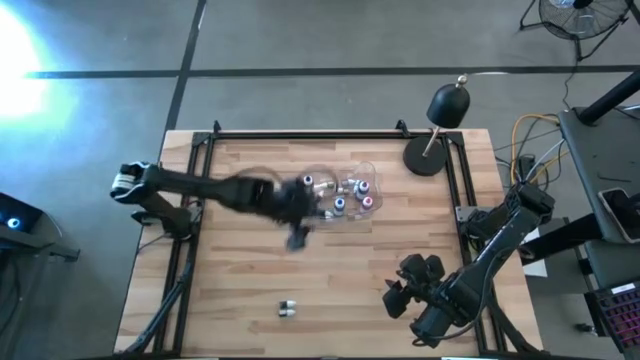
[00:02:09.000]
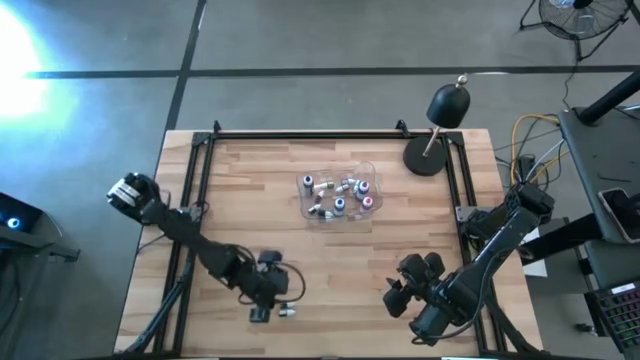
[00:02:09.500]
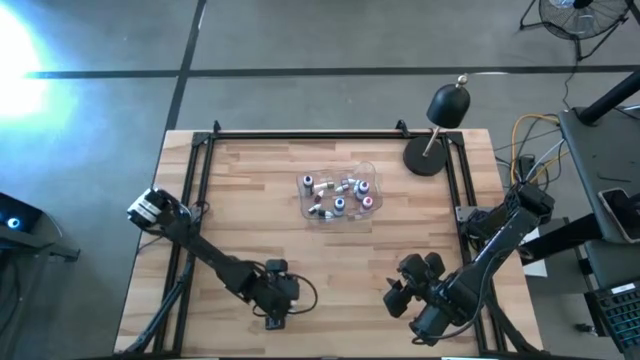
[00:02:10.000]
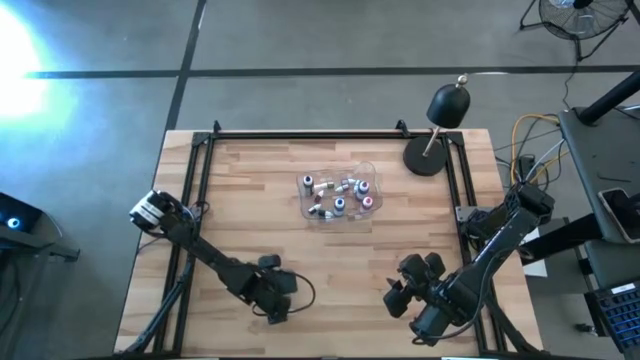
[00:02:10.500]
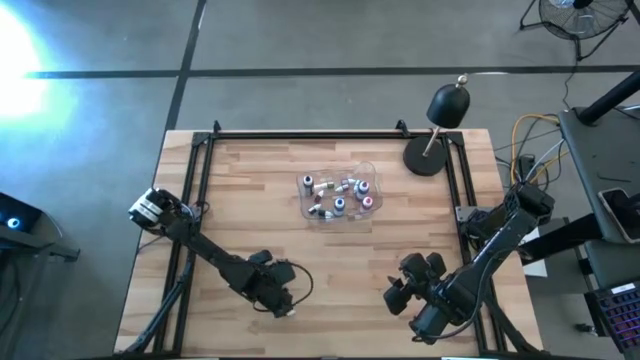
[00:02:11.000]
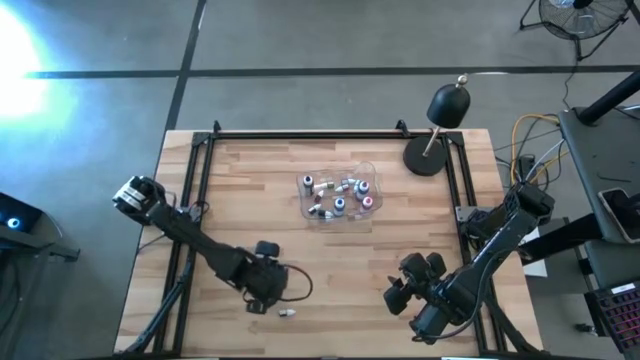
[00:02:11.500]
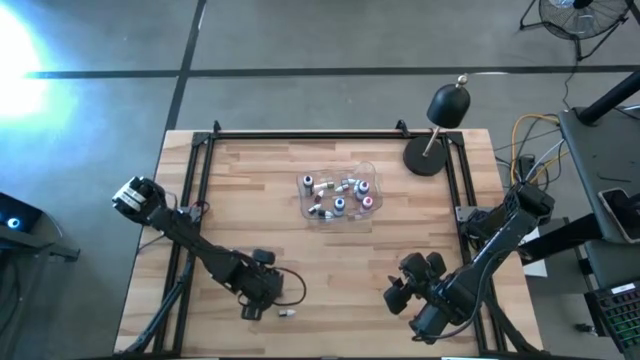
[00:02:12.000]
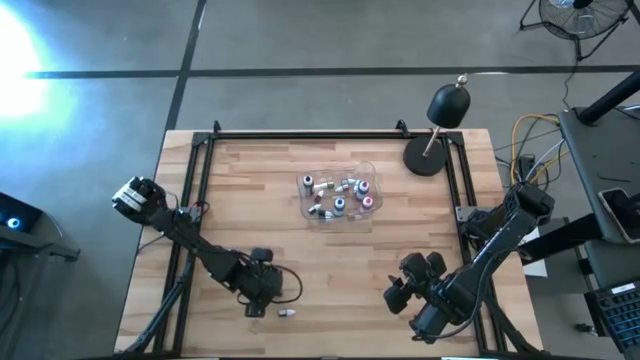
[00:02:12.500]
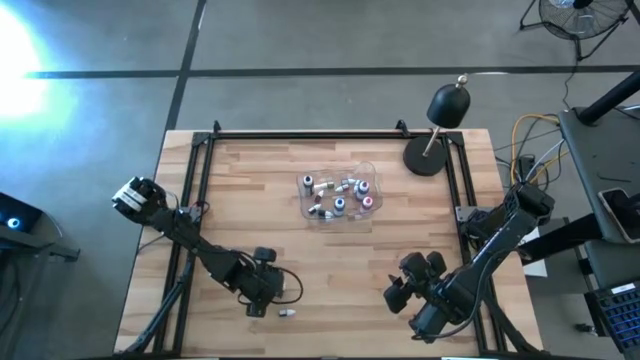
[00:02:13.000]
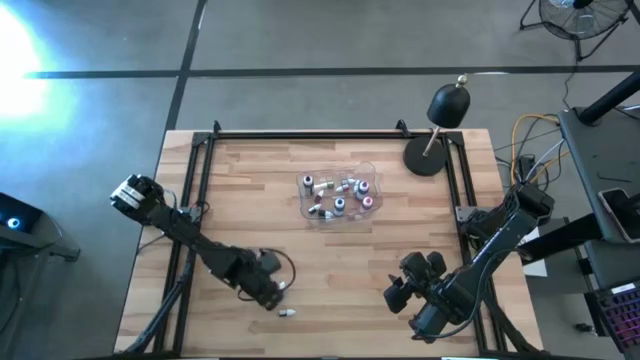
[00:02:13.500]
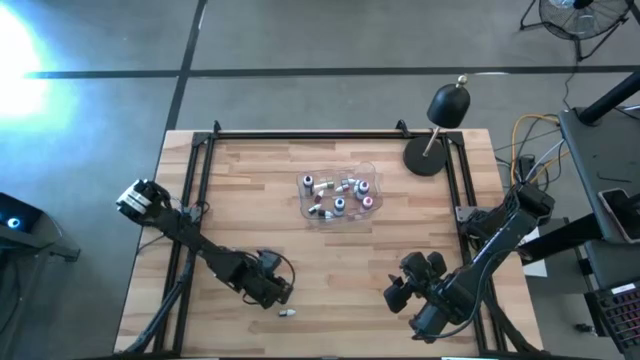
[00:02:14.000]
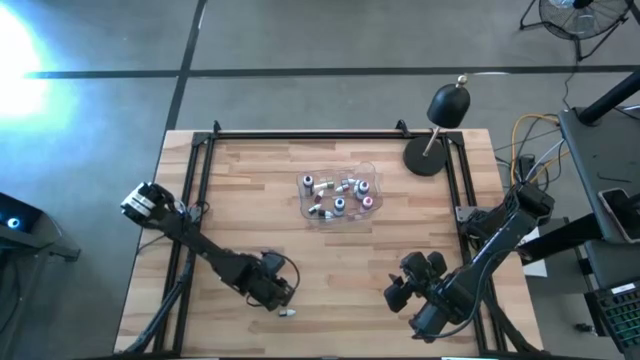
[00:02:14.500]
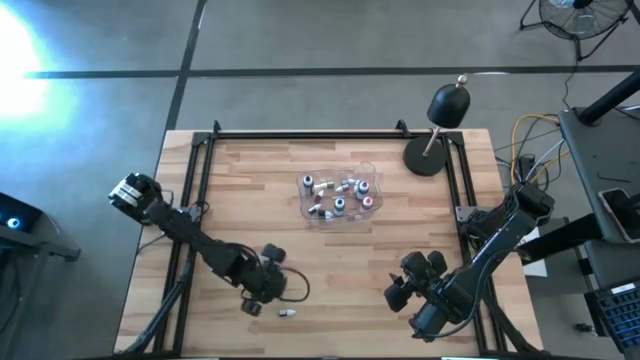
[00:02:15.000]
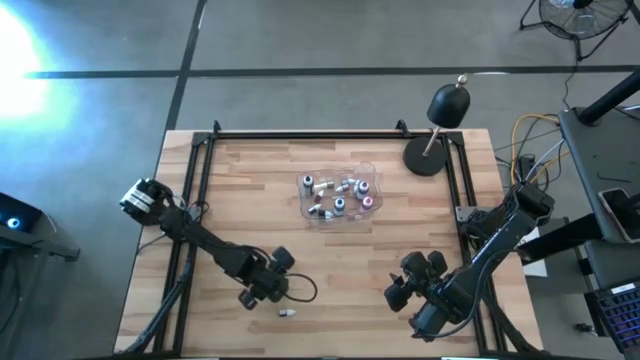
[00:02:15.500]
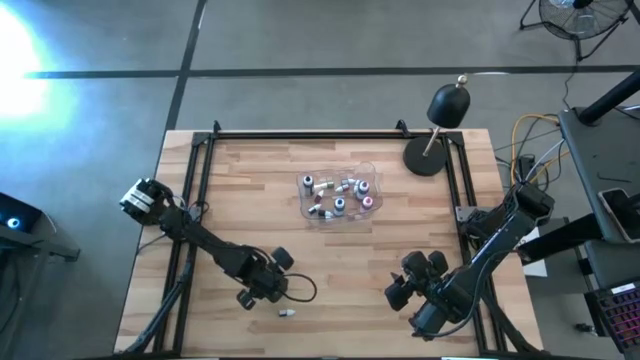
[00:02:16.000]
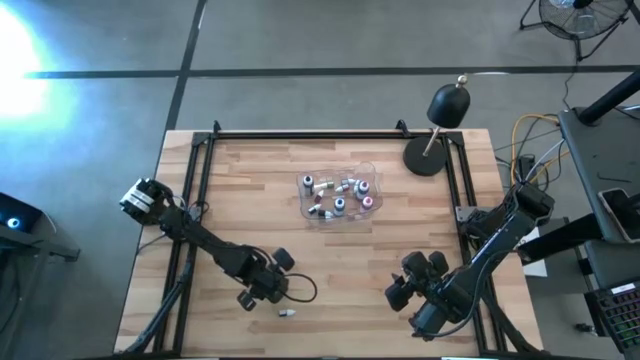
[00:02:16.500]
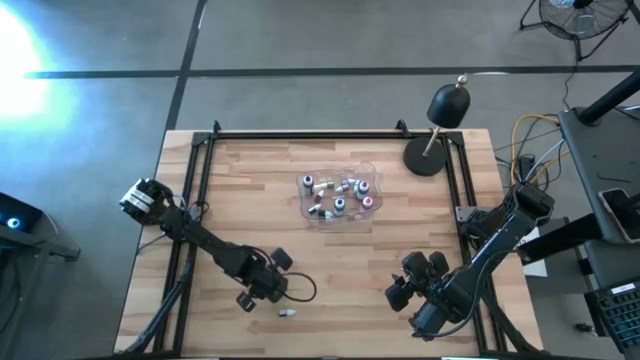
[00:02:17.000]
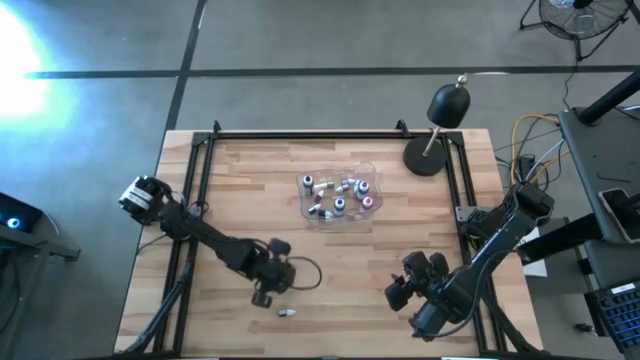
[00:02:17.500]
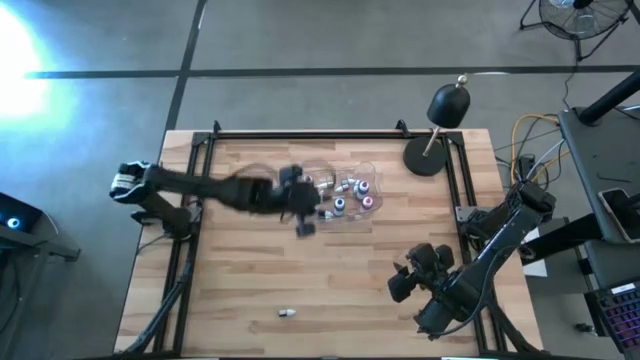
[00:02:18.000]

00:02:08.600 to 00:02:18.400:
Task: Pick & Place food coloring
Put the small violet food coloring bottle into the transparent bin

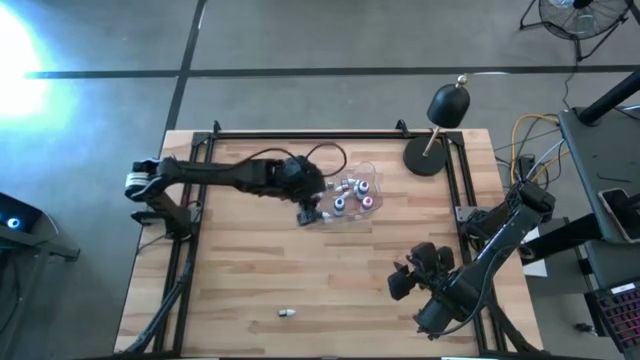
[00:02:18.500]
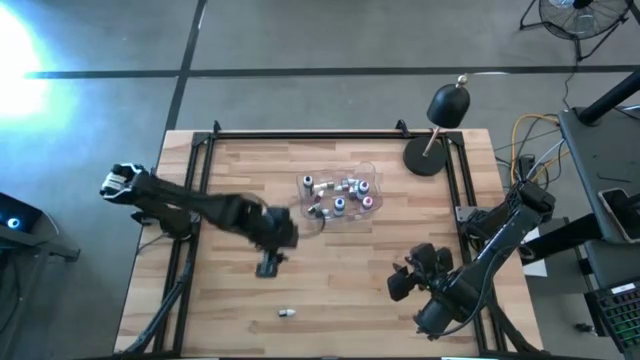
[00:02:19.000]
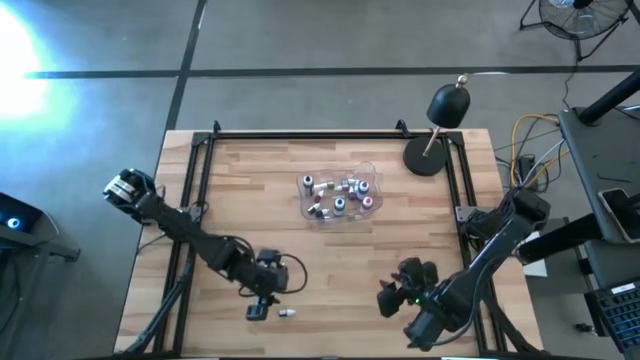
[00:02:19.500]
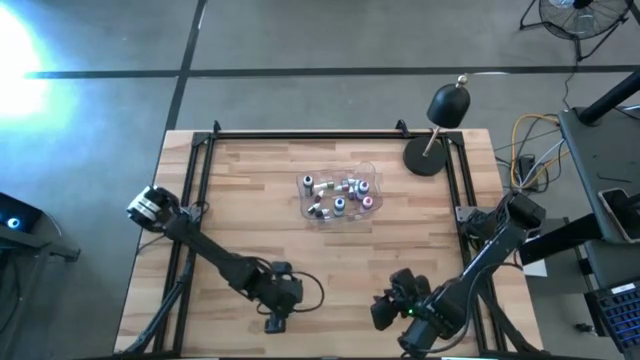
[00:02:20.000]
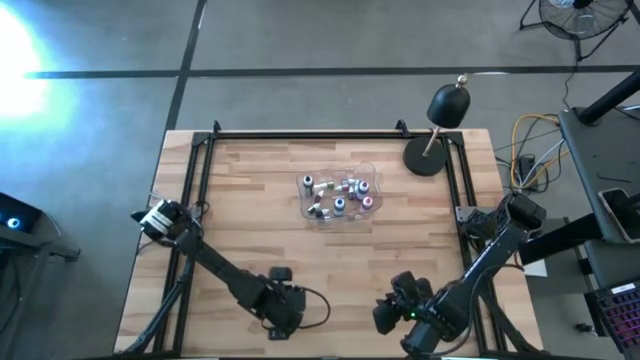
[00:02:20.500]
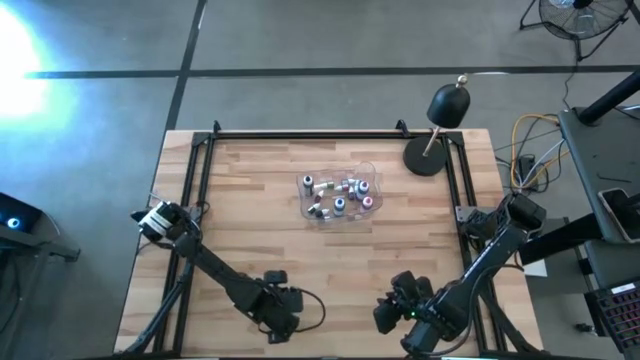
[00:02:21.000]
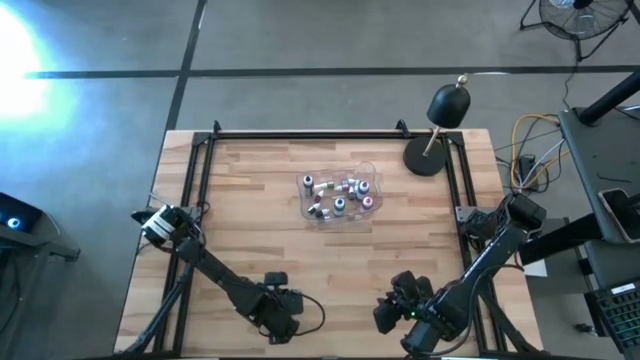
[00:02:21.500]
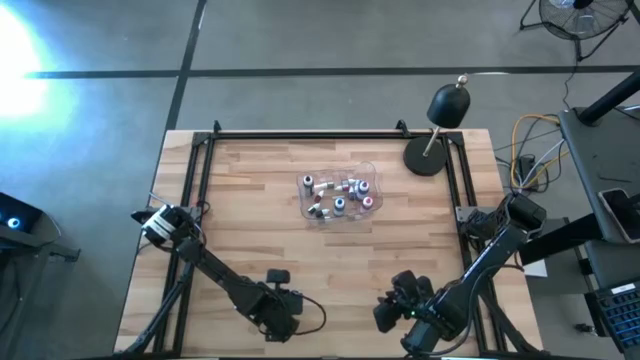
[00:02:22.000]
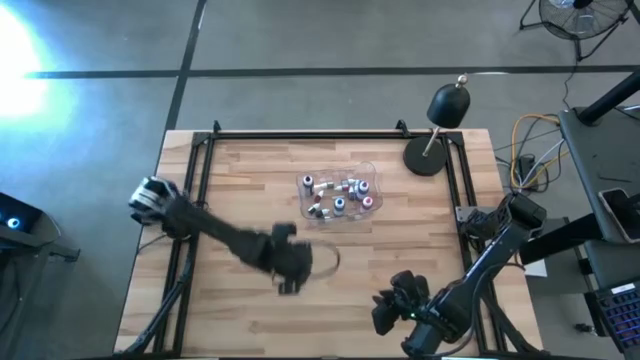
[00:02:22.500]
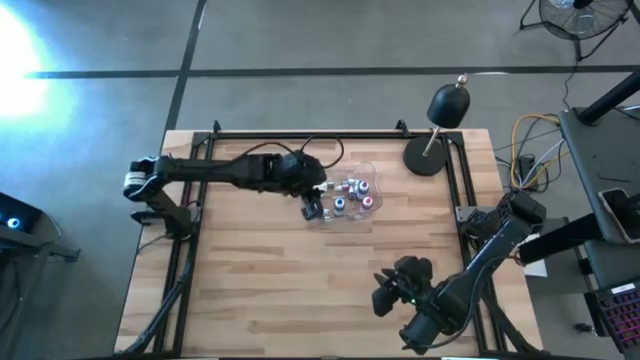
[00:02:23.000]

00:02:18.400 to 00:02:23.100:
Put the small blue food coloring bottle into the transparent bin

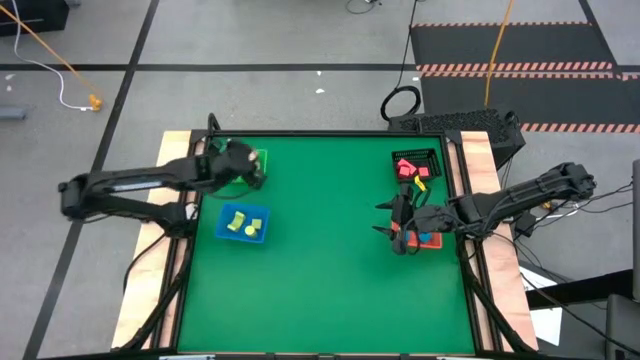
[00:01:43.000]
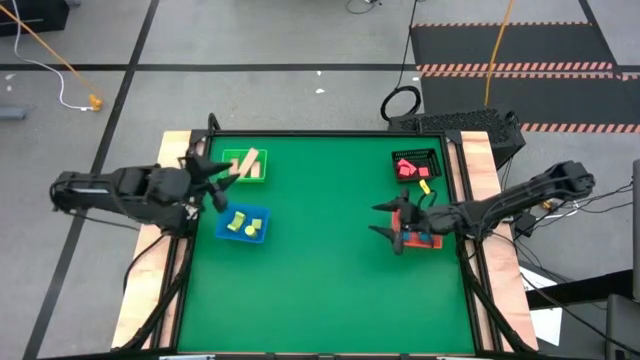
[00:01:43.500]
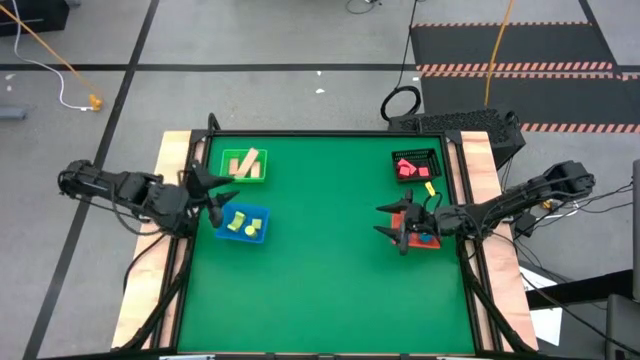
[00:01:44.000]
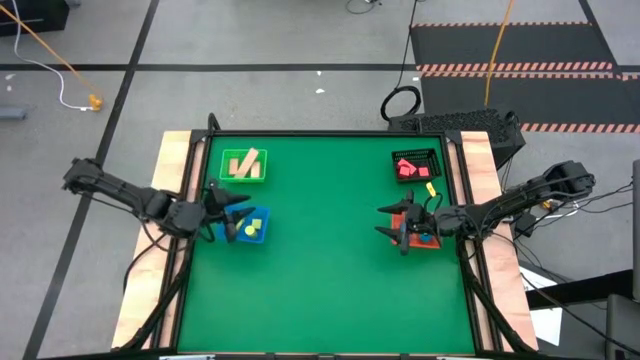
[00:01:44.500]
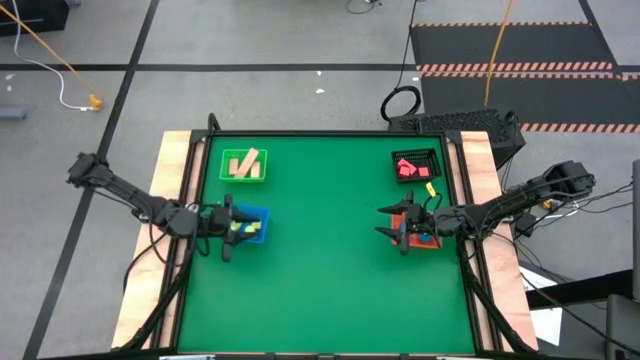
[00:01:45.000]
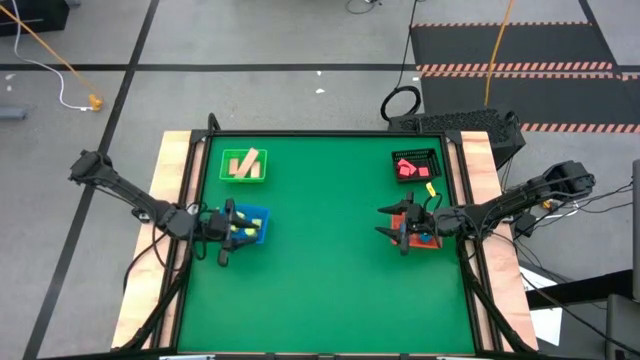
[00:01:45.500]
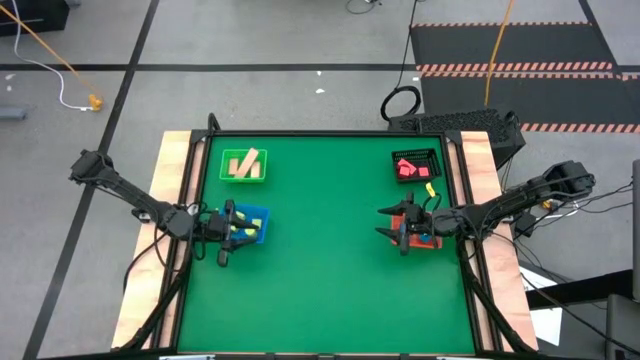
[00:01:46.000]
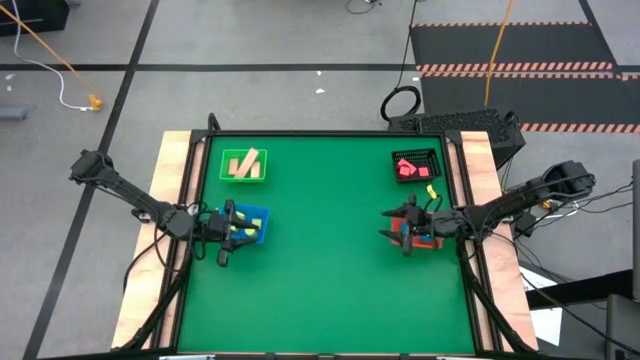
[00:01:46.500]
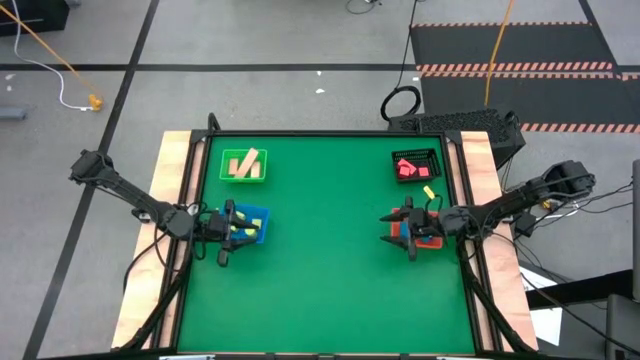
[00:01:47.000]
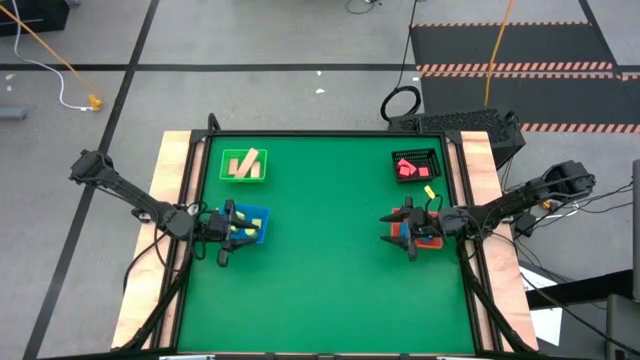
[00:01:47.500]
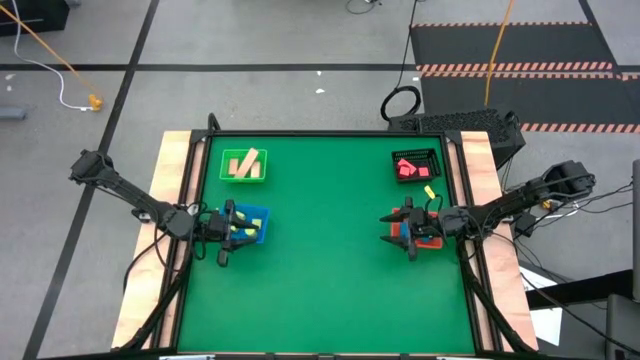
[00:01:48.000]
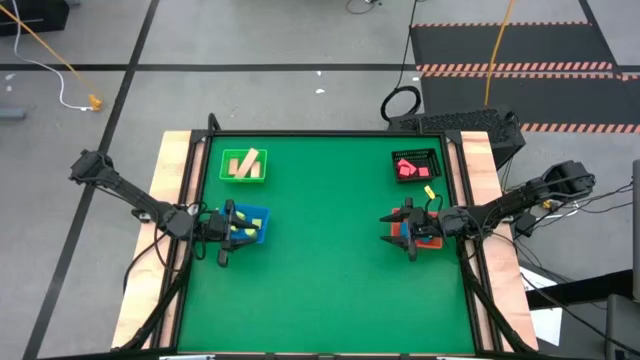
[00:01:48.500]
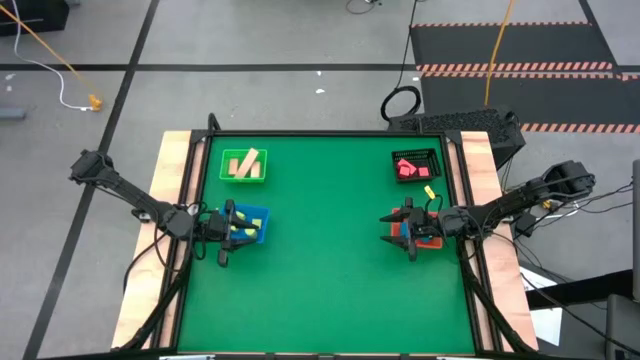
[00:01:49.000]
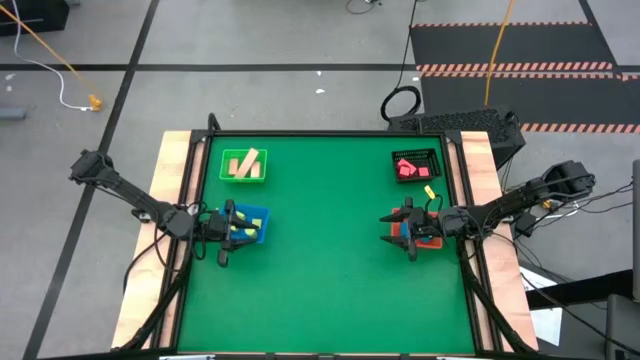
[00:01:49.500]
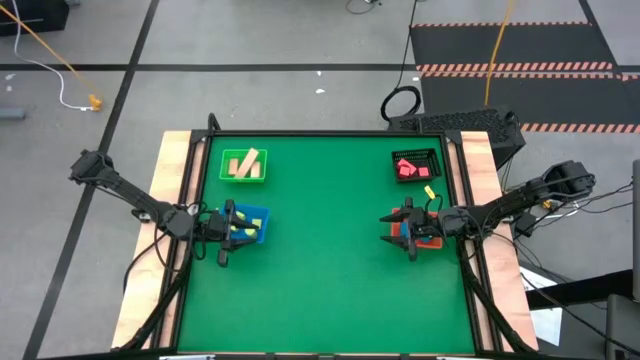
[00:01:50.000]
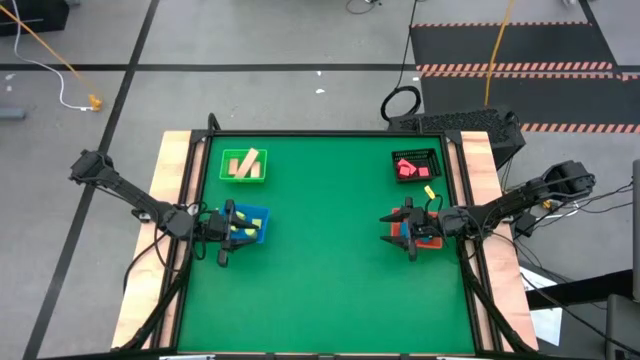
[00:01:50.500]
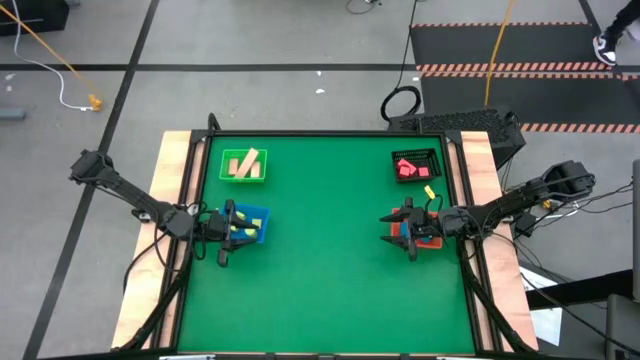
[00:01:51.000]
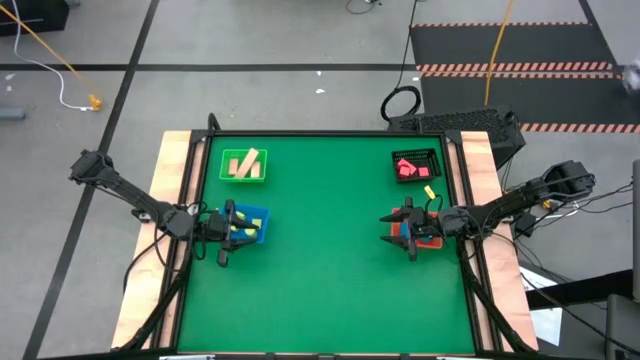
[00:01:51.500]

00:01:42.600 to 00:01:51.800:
Task: Sort & place blocks by color
Return to Home Position
